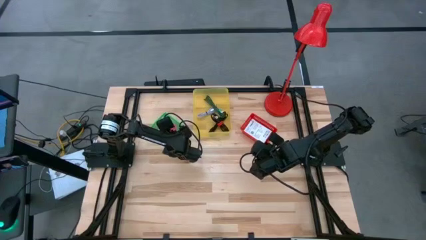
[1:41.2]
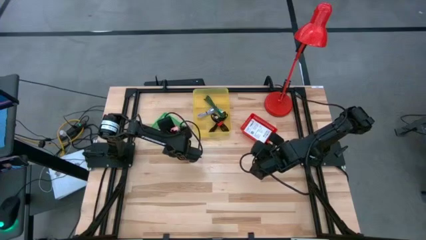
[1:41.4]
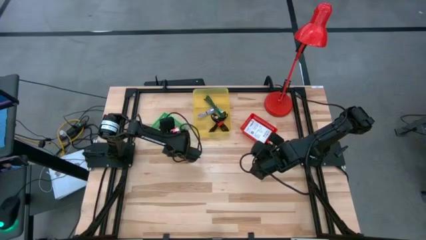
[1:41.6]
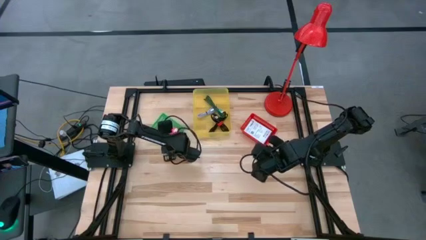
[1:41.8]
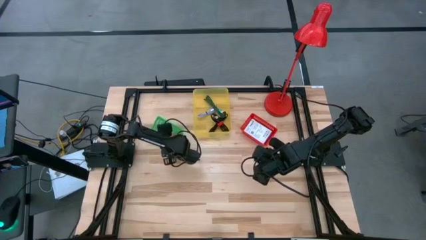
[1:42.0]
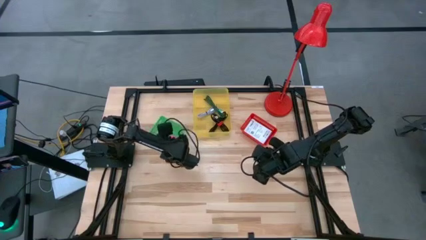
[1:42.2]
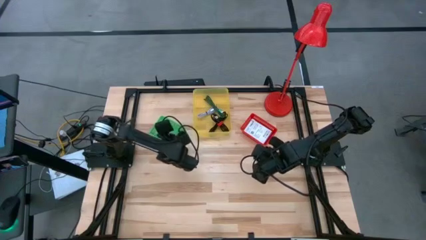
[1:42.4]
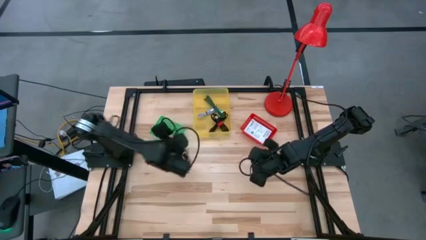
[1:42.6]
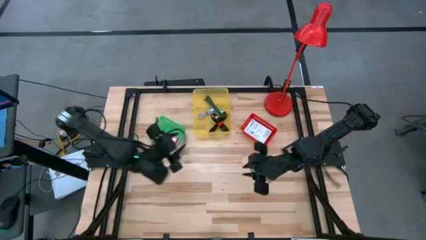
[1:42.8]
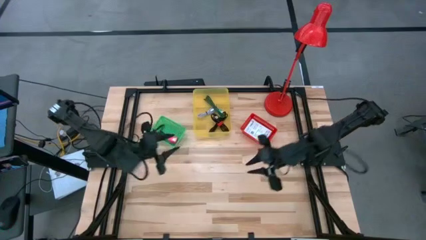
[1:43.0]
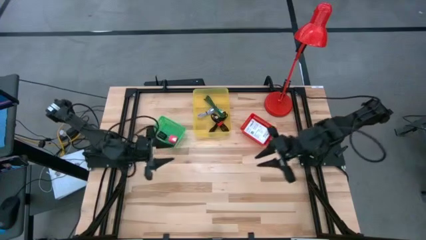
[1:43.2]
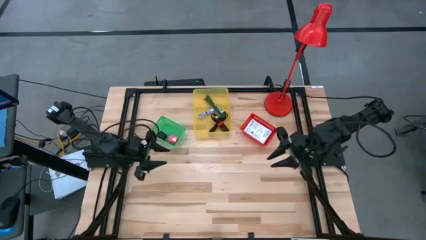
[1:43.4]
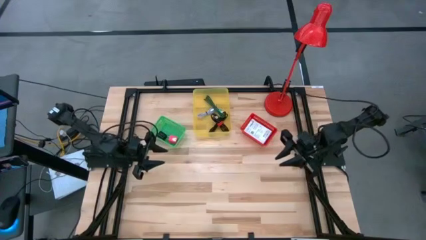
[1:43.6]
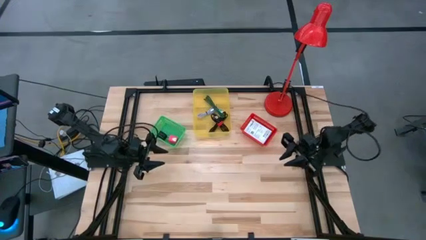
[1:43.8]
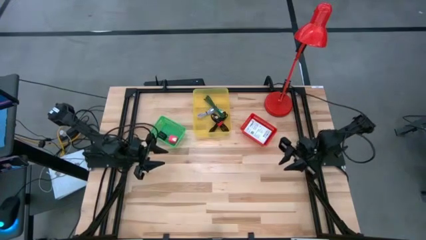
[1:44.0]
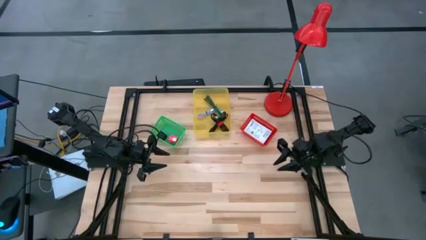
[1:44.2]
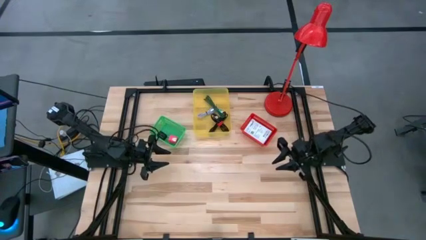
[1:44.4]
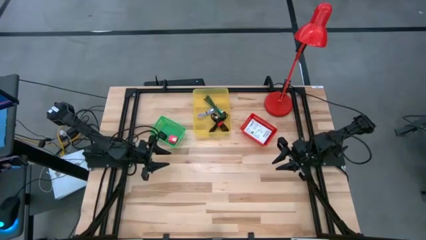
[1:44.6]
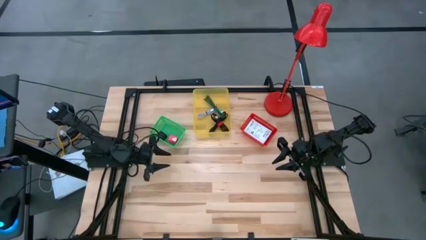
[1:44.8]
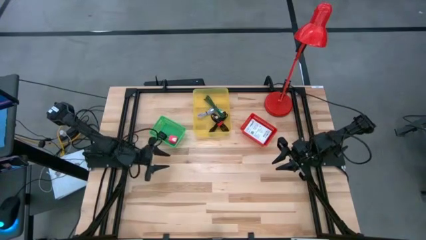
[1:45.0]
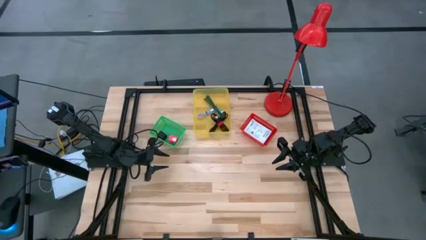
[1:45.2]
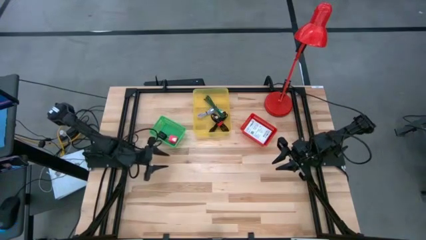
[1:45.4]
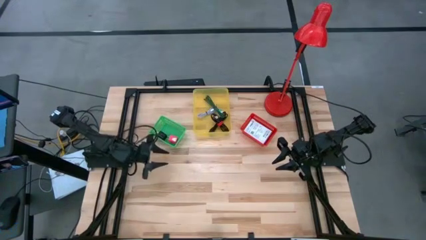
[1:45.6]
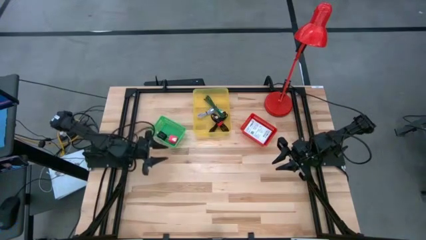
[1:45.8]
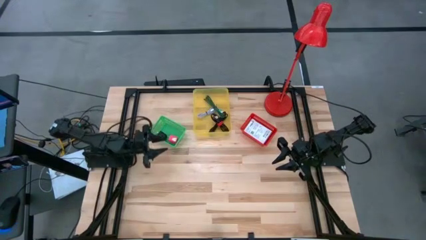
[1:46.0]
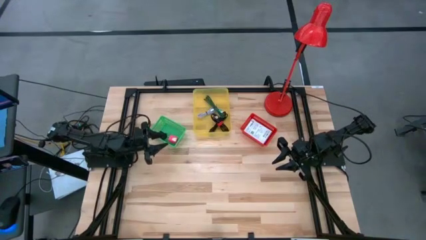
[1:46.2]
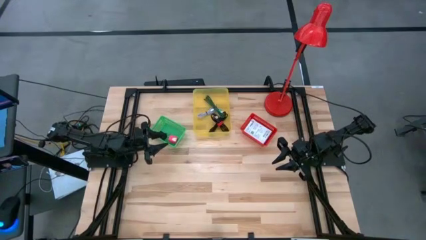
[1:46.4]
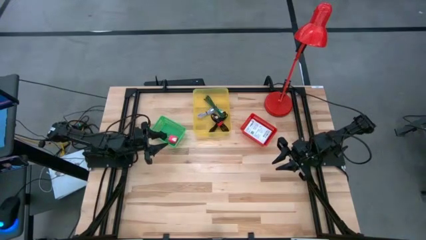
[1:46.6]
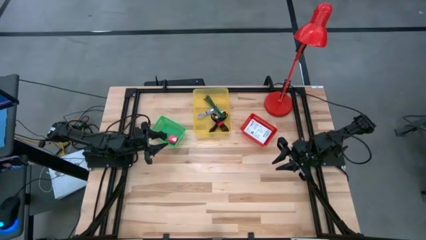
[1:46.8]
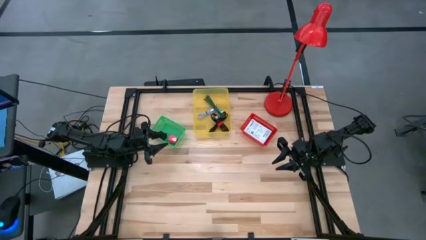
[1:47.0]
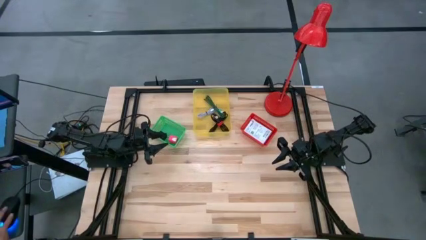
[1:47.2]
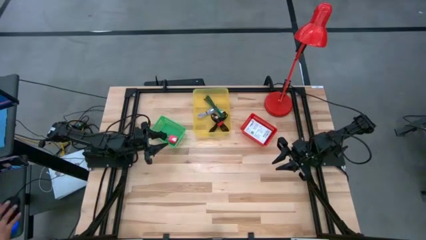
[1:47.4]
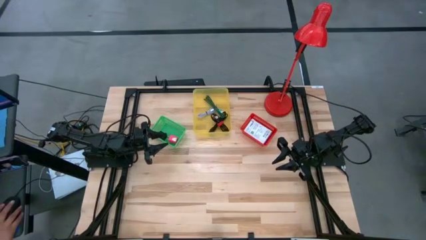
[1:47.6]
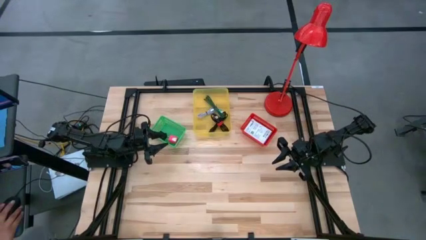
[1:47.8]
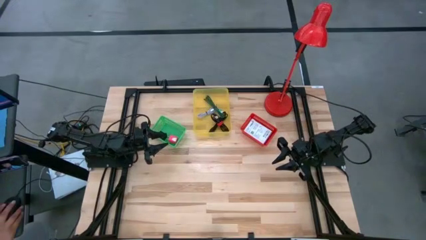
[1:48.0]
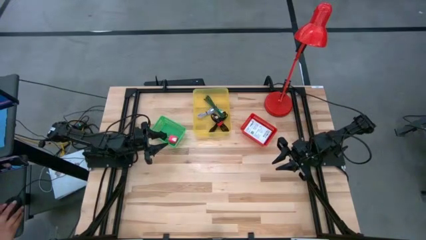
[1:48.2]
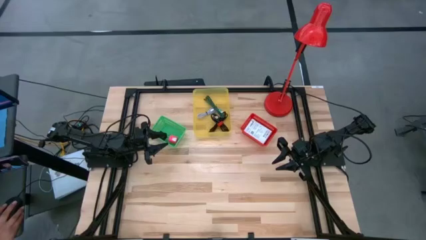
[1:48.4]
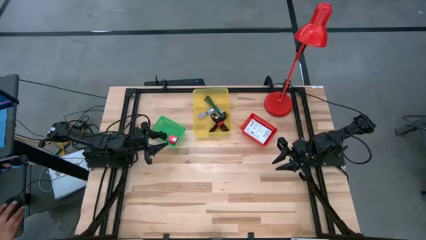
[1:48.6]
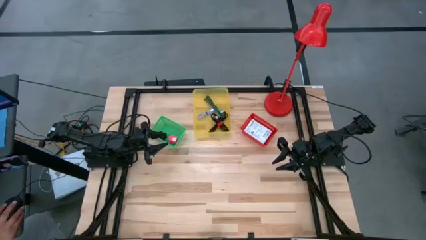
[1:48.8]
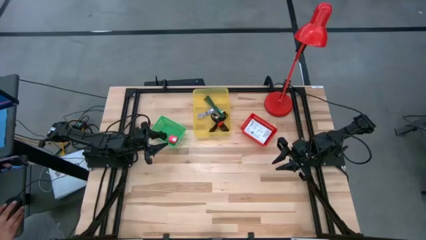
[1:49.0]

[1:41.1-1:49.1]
Task: Pick and place items into bin
Return to Home Position

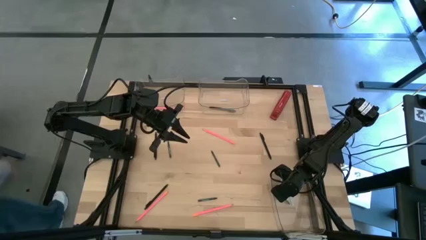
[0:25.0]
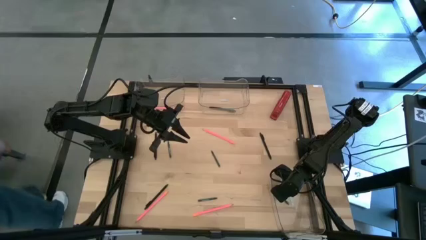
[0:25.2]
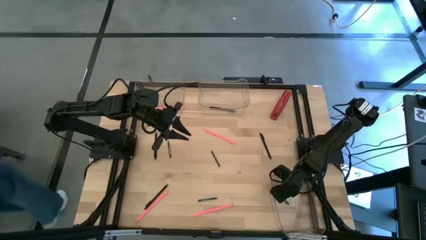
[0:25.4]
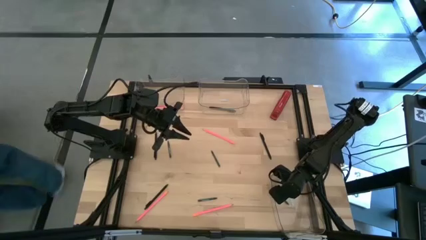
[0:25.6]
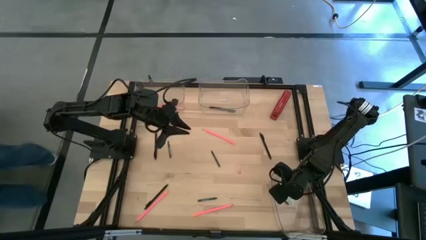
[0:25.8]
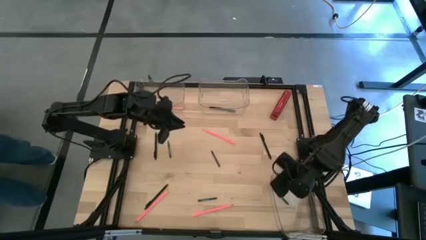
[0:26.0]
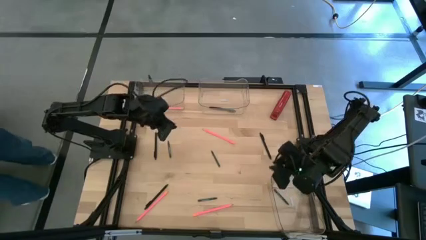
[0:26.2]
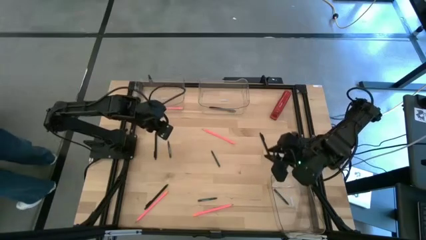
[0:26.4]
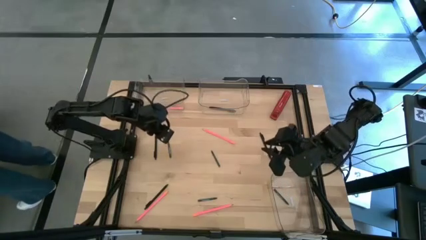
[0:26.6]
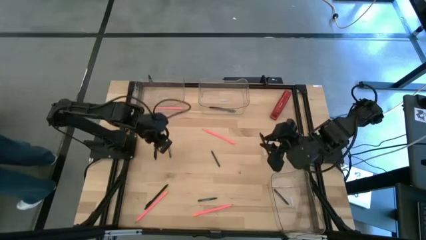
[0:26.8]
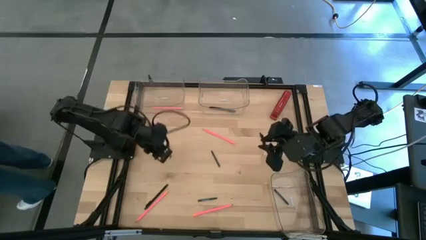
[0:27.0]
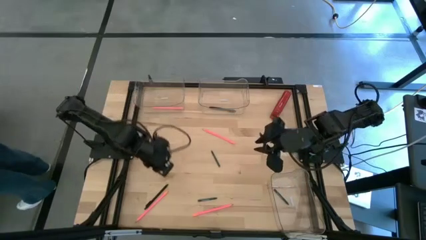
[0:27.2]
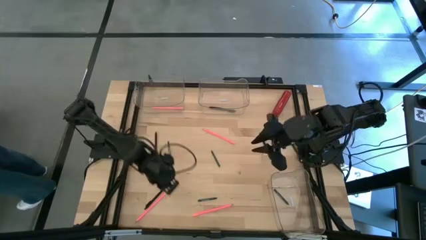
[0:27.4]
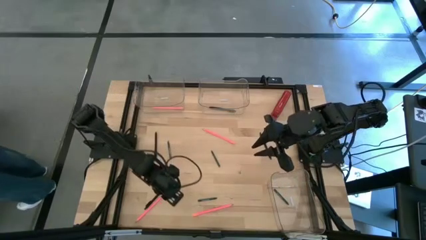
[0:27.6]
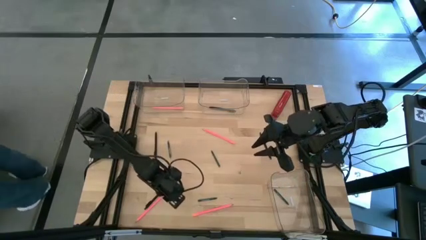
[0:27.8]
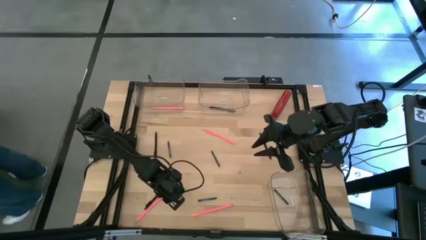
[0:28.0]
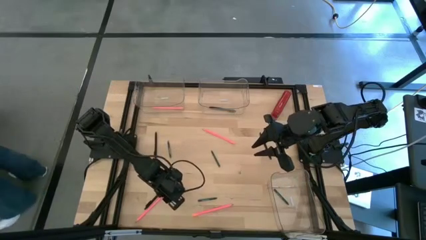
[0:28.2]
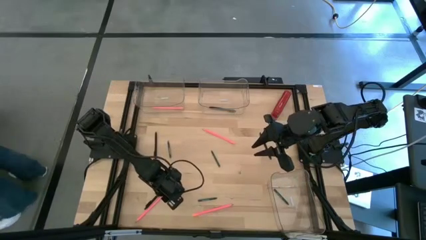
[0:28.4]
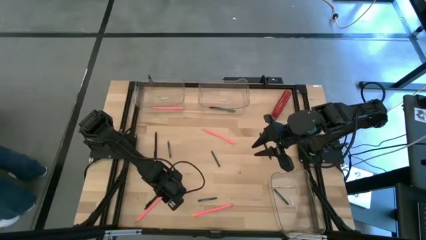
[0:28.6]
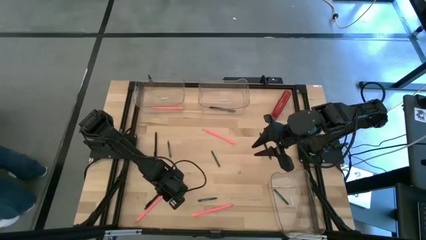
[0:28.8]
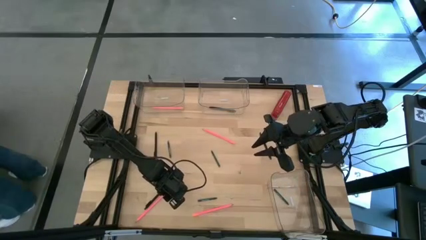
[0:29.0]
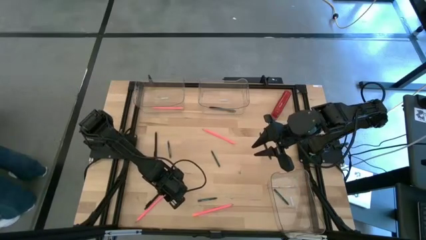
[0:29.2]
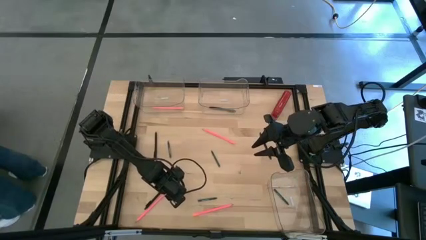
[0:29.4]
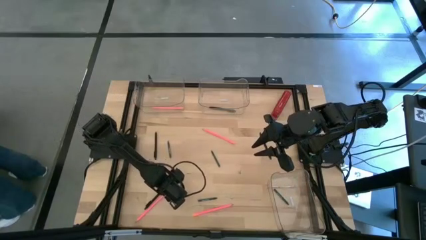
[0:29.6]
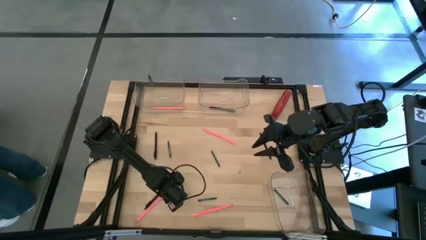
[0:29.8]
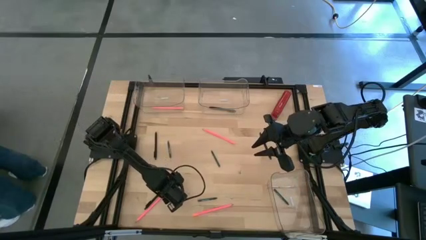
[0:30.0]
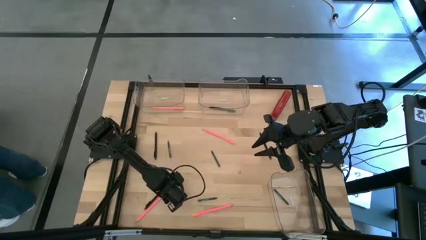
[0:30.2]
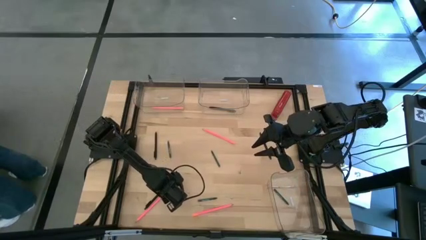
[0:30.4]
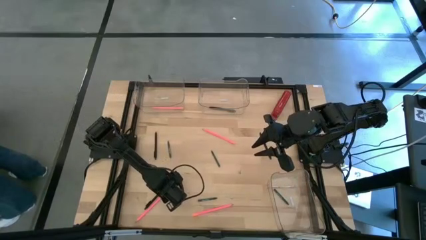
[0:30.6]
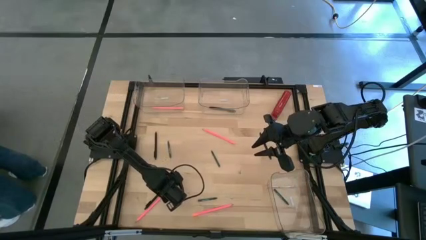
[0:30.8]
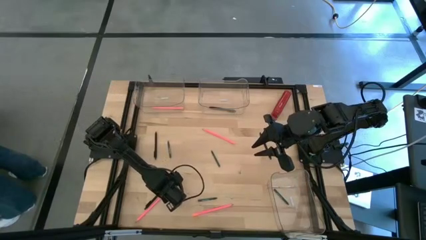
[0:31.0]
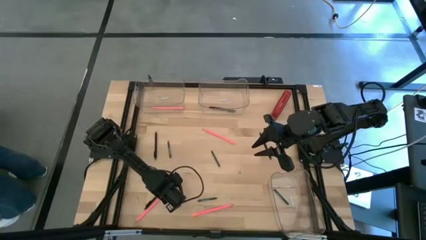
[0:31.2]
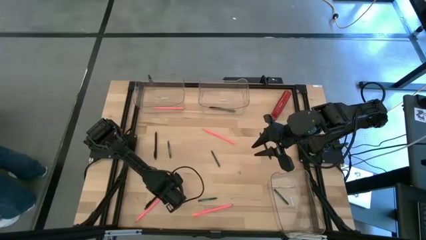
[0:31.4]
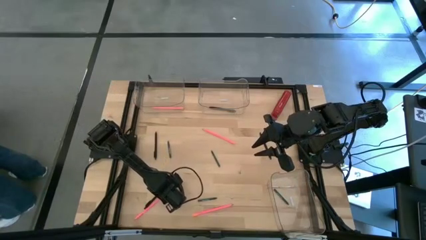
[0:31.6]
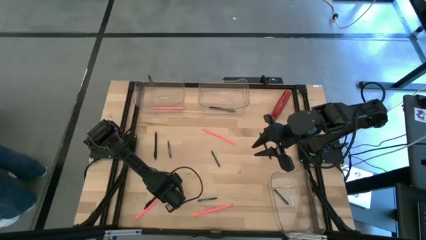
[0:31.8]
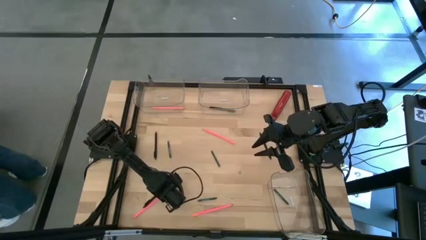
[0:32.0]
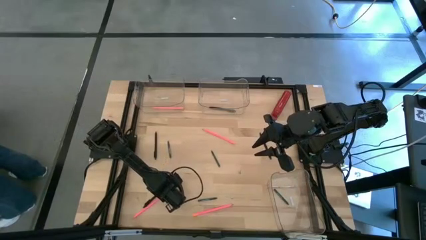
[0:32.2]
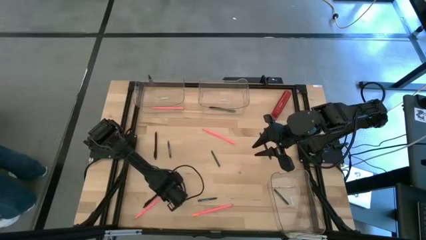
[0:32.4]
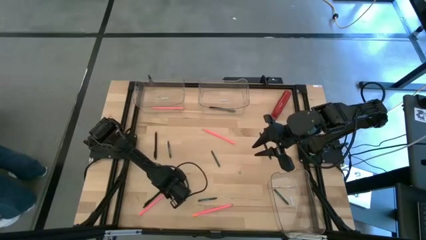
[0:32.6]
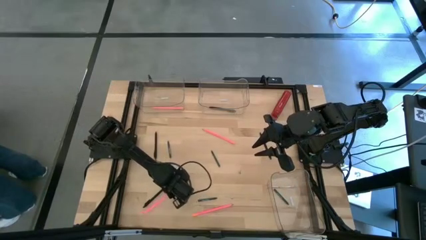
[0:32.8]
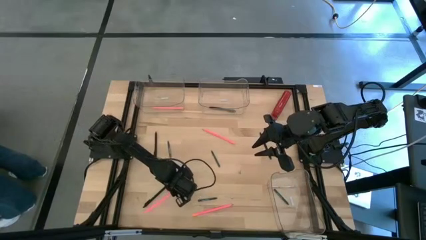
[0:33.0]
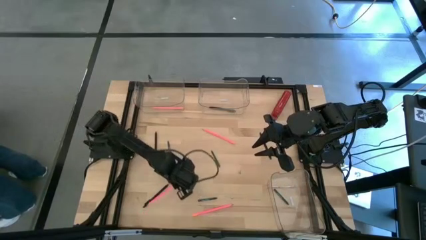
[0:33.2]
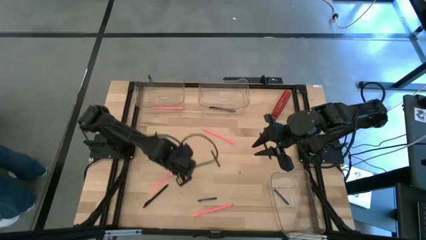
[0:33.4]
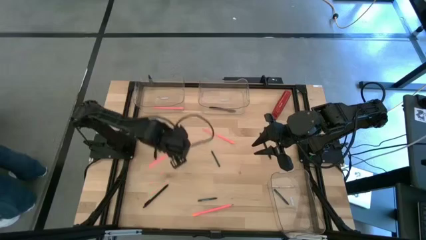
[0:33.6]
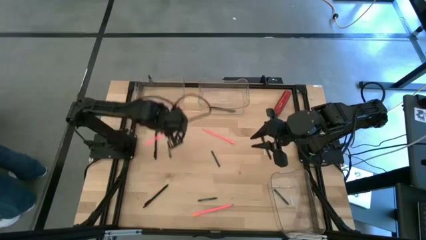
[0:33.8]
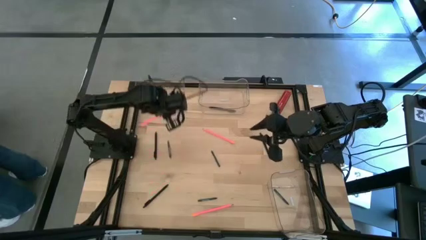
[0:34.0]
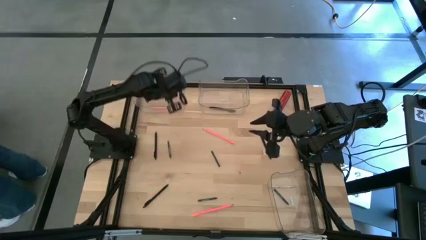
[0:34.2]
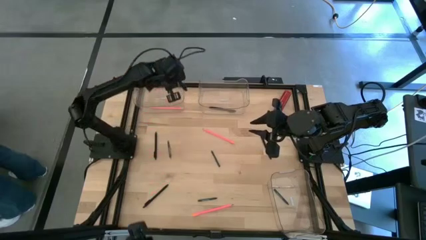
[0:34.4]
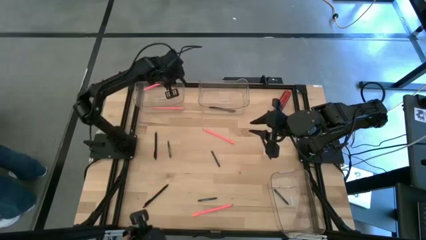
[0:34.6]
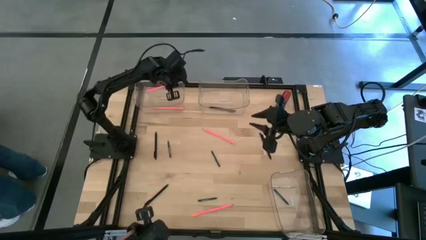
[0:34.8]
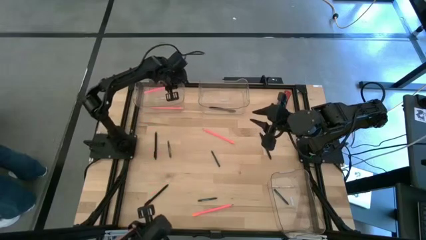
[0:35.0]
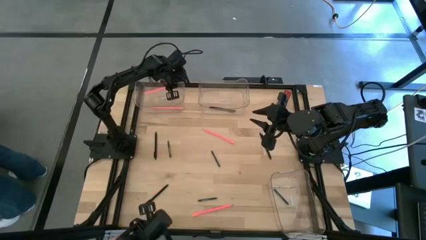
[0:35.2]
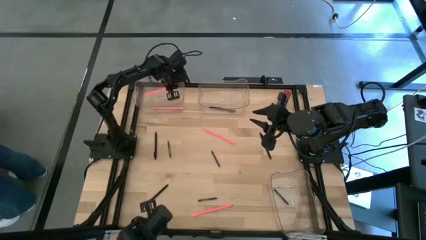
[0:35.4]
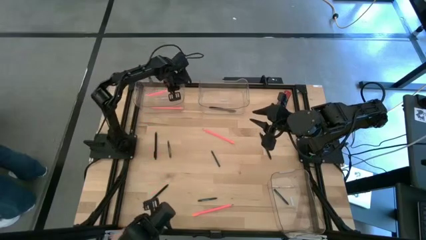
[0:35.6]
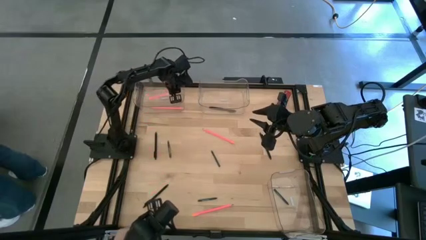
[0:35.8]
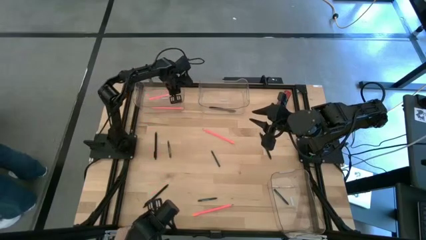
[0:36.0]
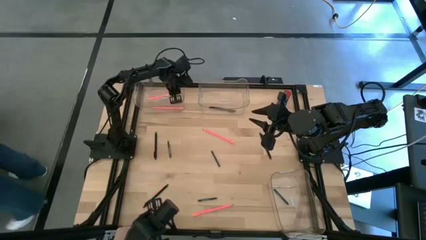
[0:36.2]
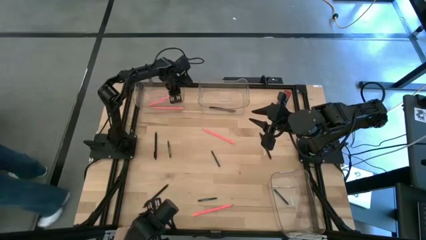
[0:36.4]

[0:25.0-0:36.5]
Task: Sort crayons/erasers/pens/pencils in bins
Put the pink pencil into the top left transparent bin
